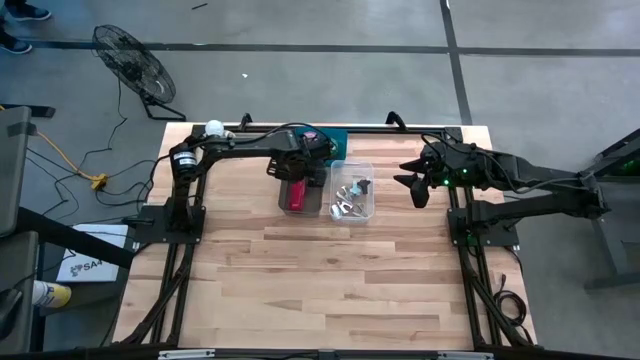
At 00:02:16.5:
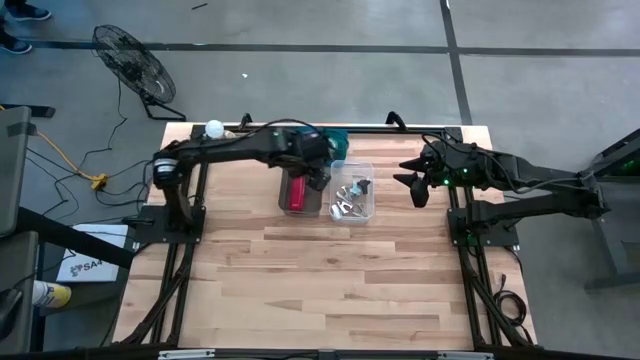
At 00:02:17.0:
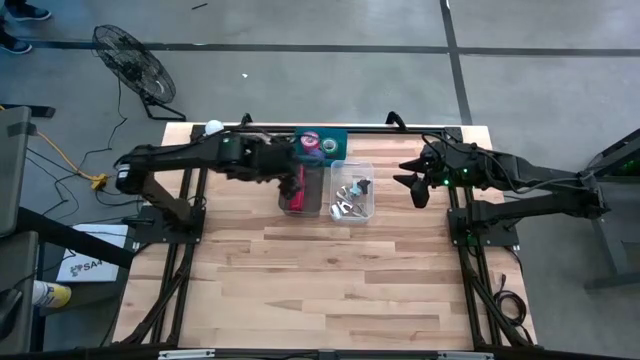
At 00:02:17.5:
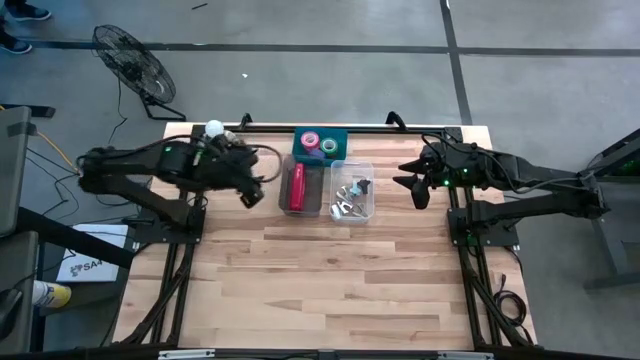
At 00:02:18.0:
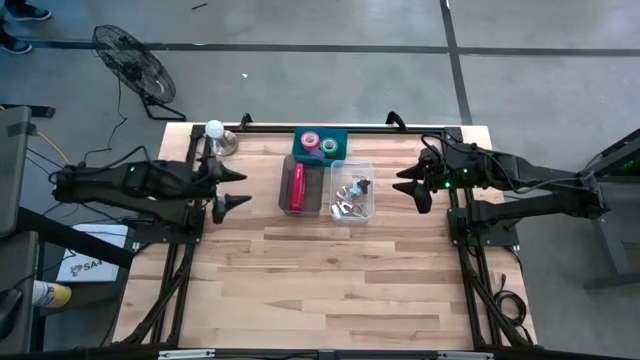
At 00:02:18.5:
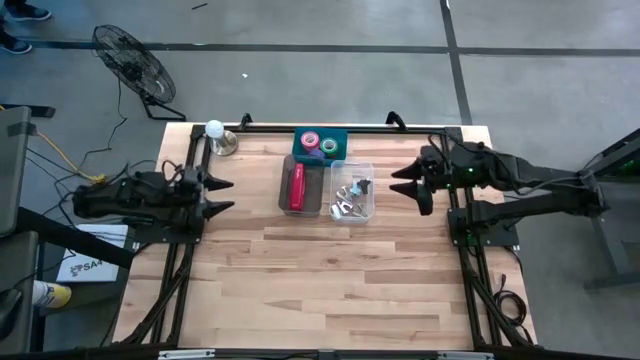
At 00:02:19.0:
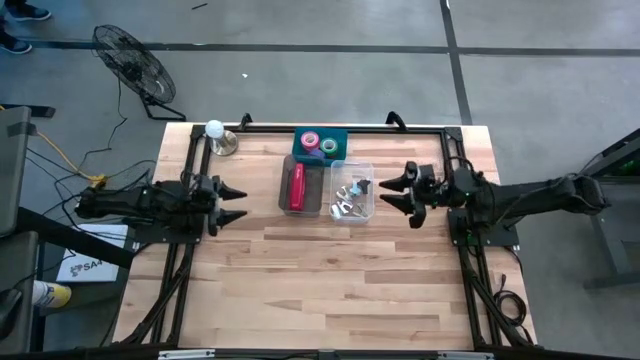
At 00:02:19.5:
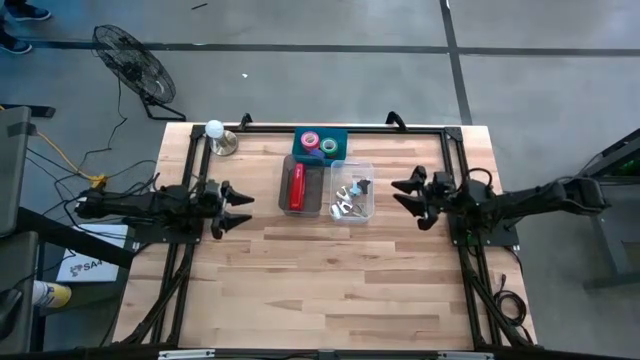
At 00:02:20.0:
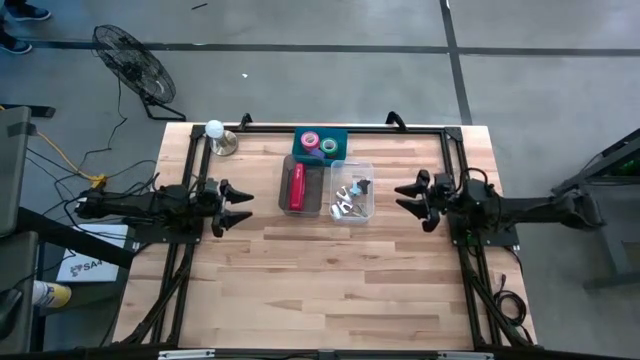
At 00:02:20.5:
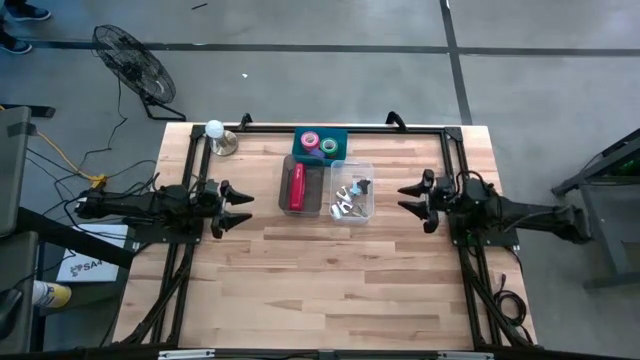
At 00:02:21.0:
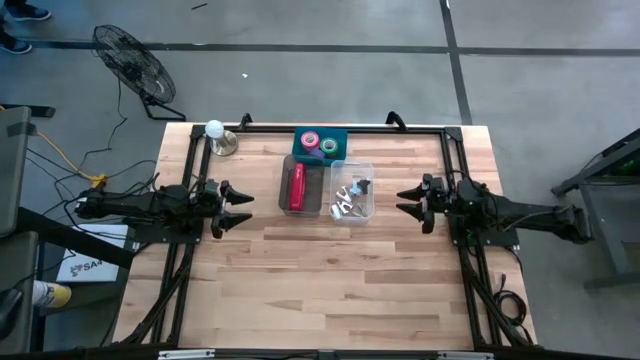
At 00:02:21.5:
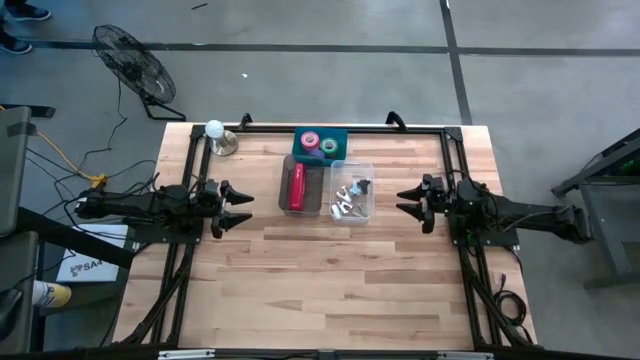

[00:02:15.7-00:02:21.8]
Task: Pick and place Stapler, Stapler remover, tape
Return to Home Position

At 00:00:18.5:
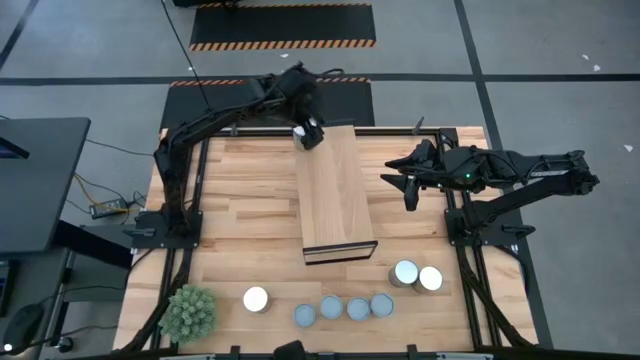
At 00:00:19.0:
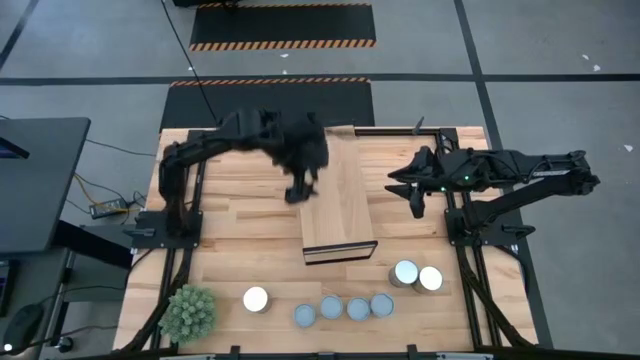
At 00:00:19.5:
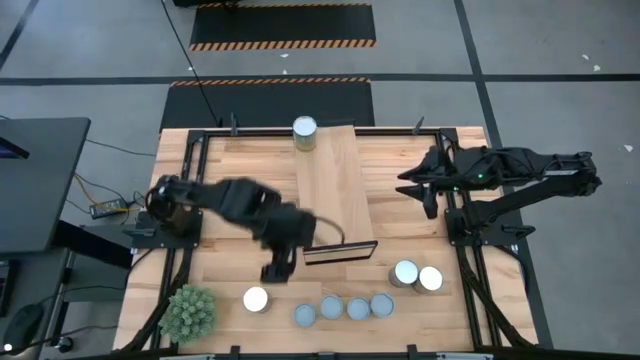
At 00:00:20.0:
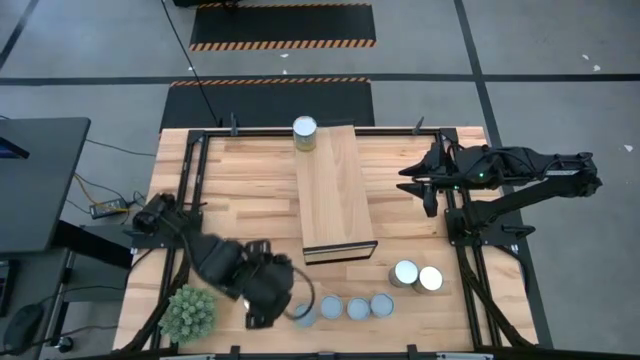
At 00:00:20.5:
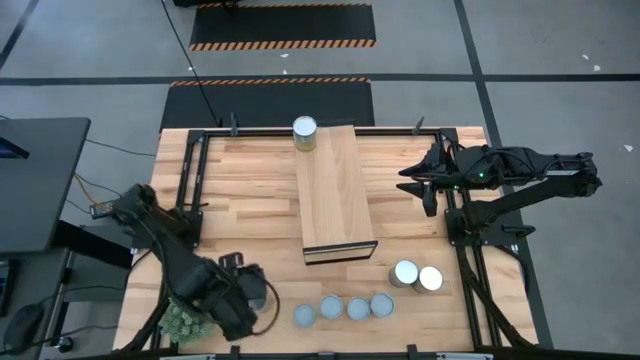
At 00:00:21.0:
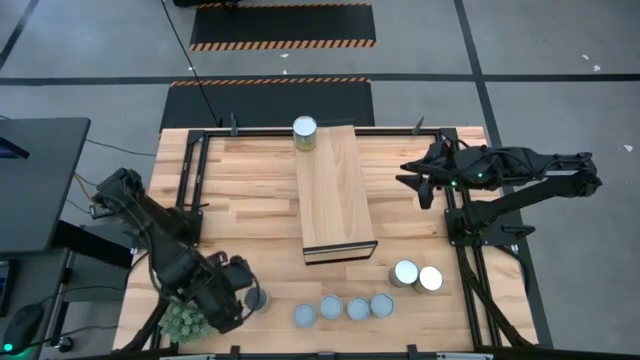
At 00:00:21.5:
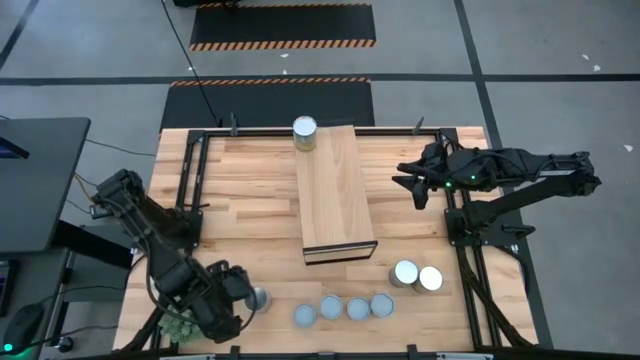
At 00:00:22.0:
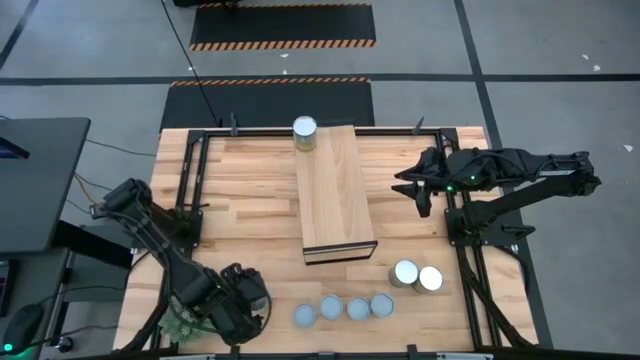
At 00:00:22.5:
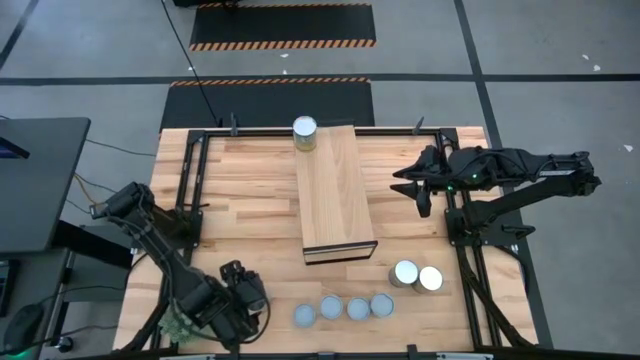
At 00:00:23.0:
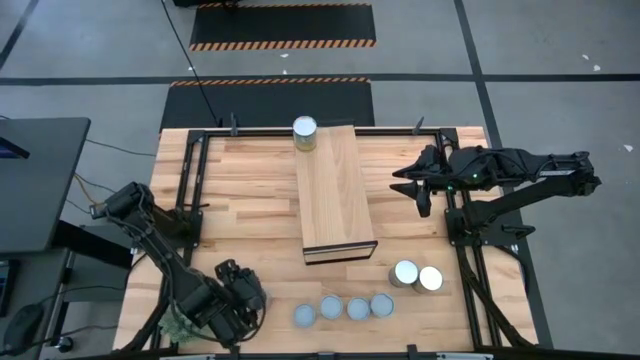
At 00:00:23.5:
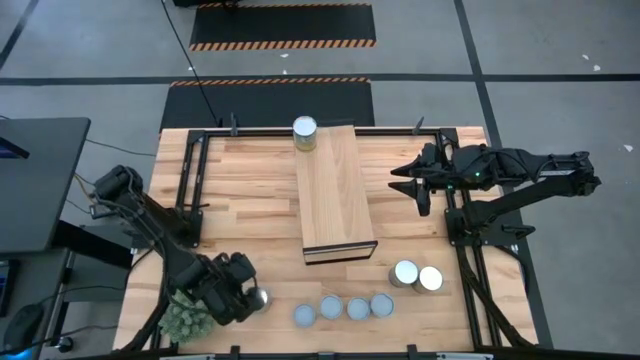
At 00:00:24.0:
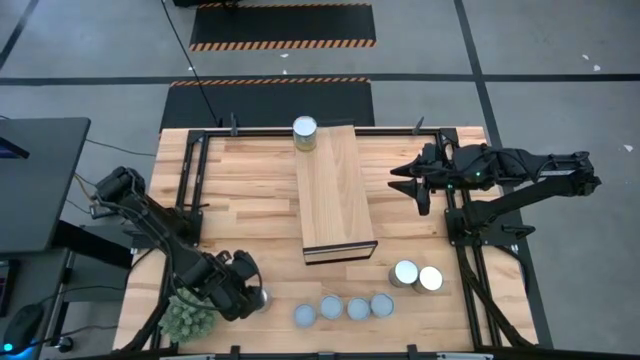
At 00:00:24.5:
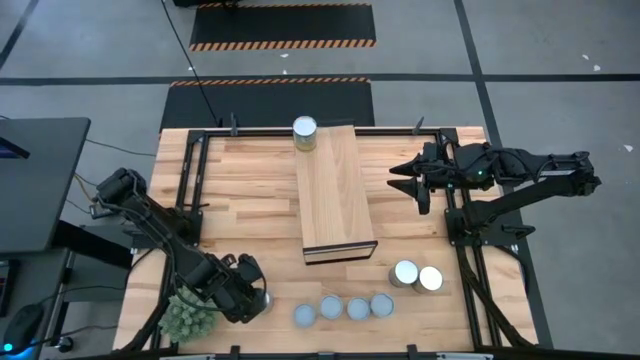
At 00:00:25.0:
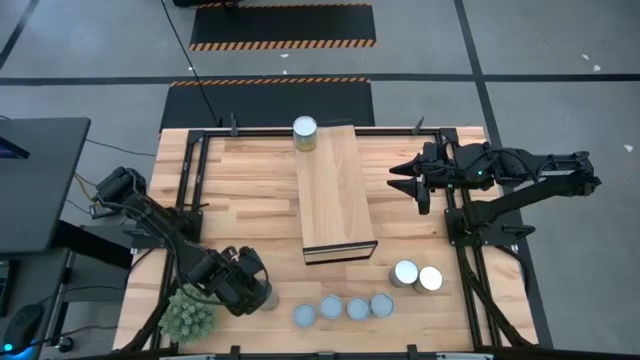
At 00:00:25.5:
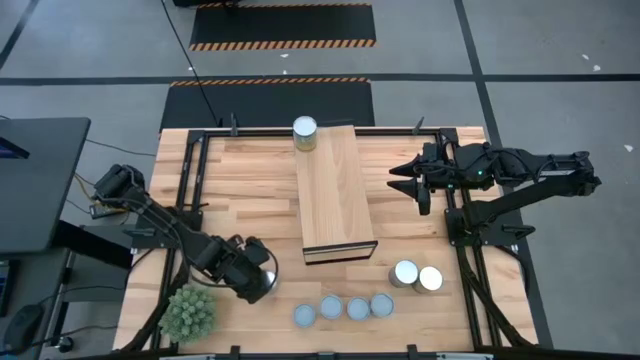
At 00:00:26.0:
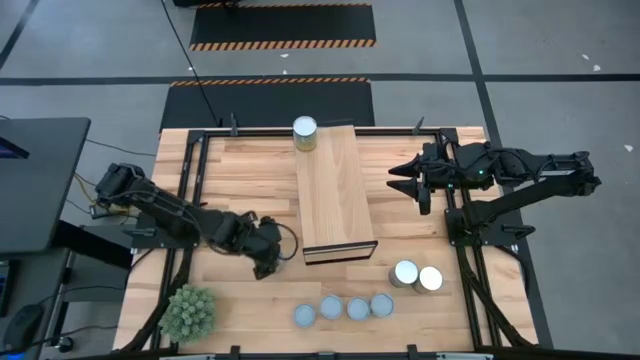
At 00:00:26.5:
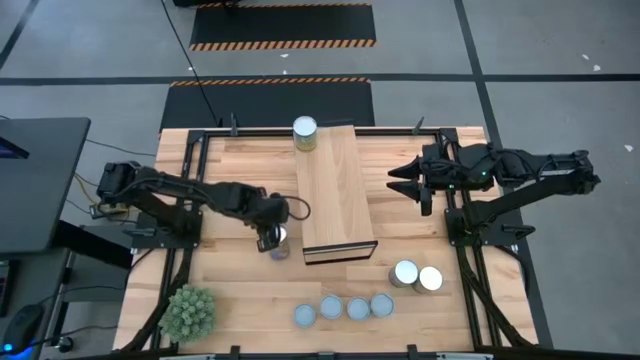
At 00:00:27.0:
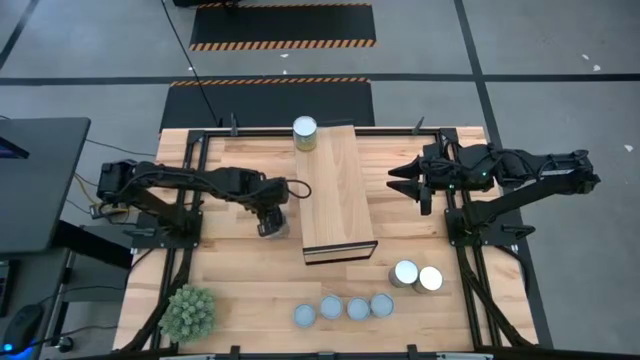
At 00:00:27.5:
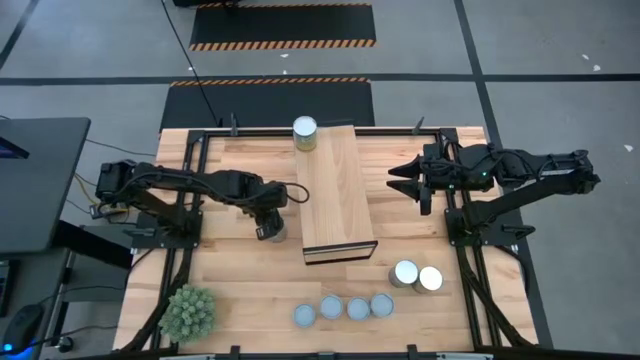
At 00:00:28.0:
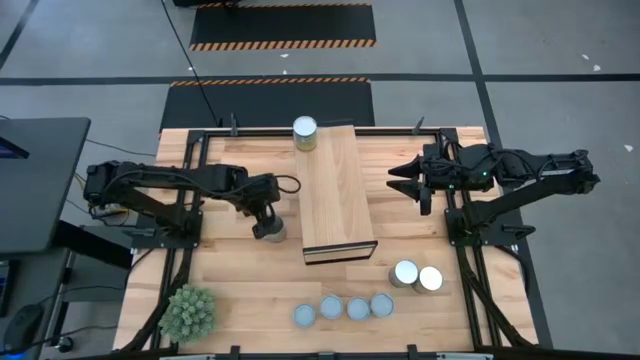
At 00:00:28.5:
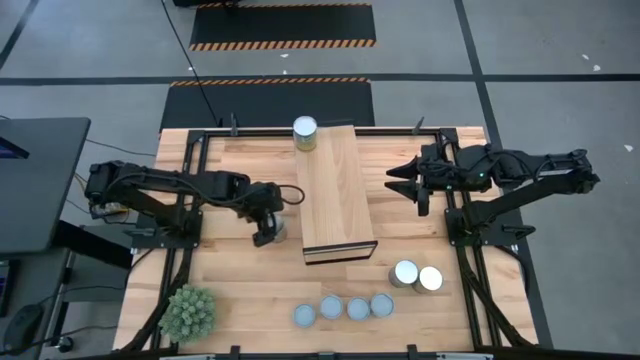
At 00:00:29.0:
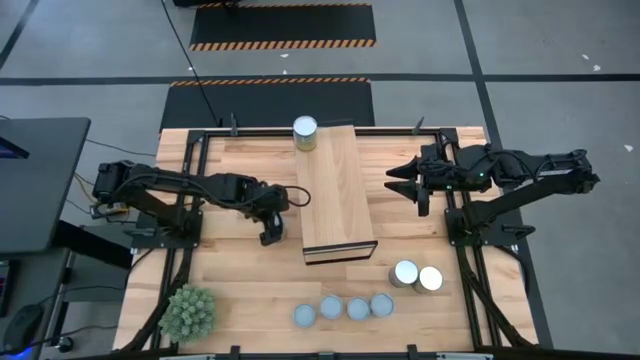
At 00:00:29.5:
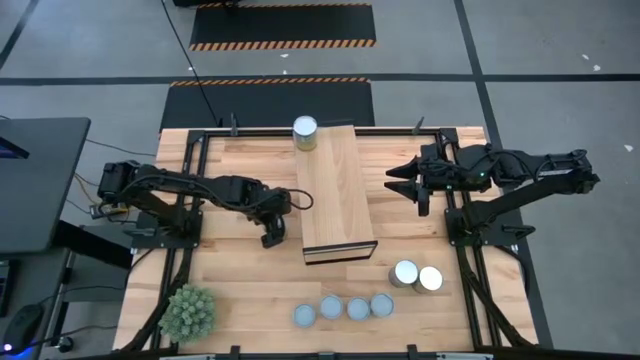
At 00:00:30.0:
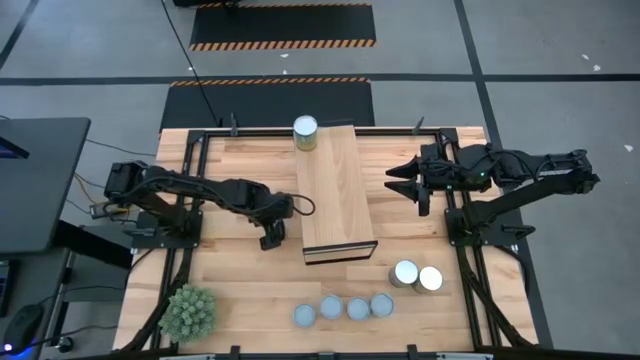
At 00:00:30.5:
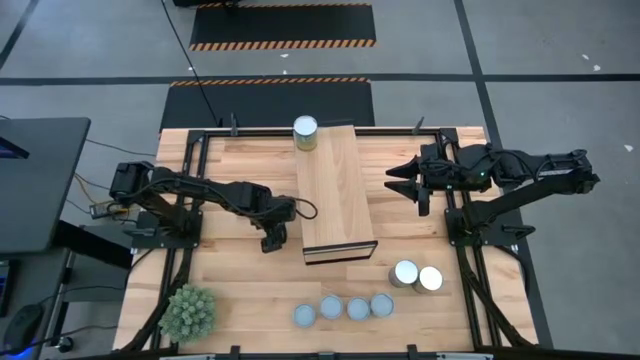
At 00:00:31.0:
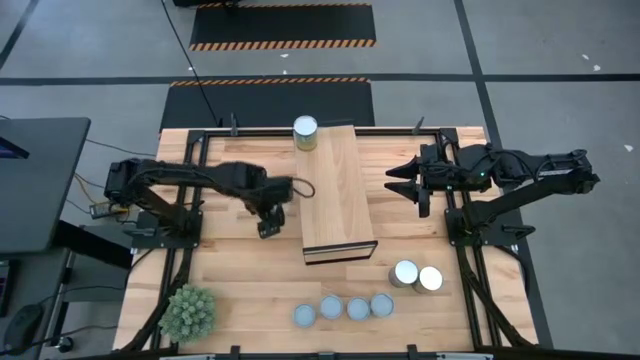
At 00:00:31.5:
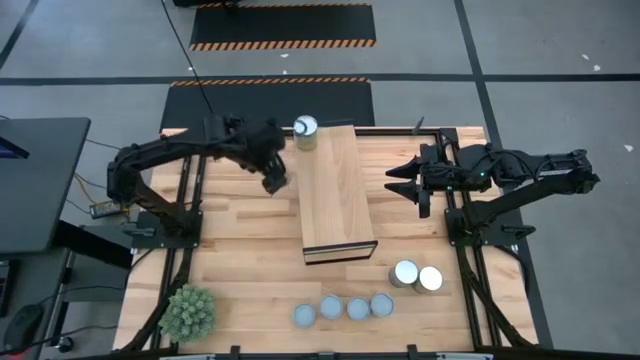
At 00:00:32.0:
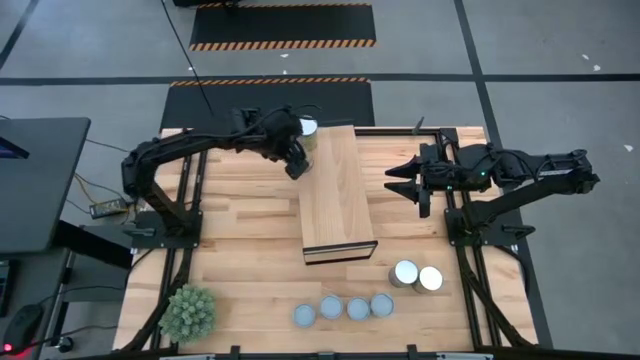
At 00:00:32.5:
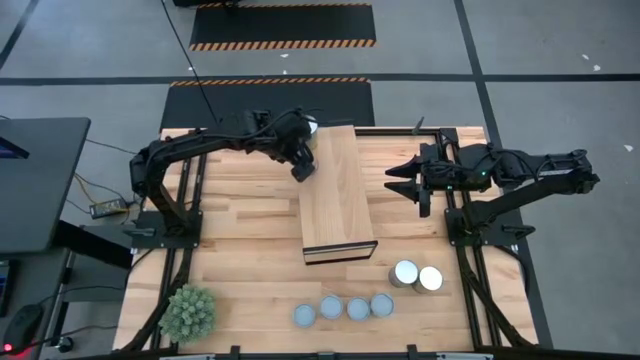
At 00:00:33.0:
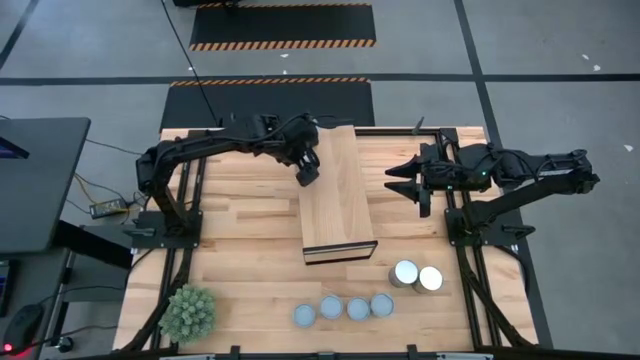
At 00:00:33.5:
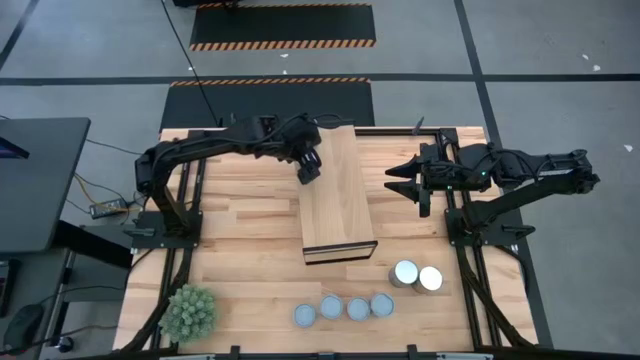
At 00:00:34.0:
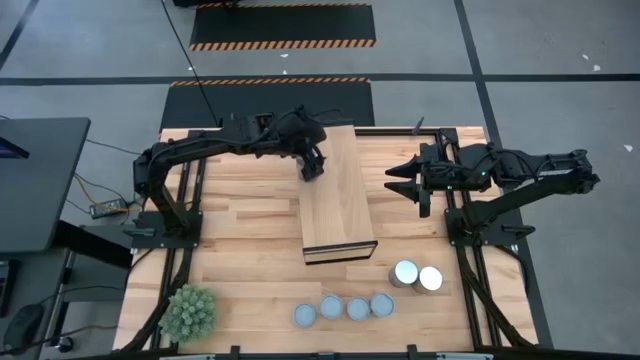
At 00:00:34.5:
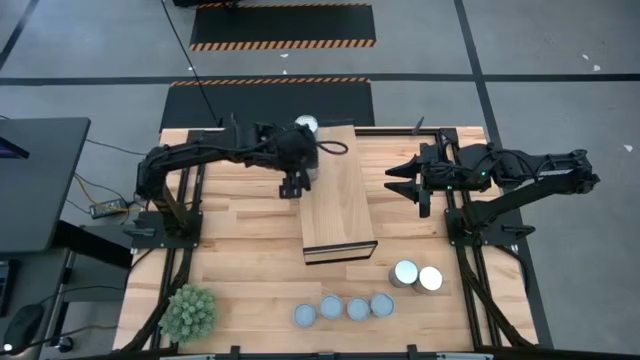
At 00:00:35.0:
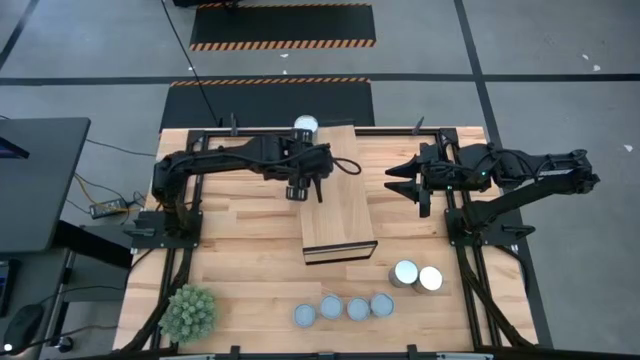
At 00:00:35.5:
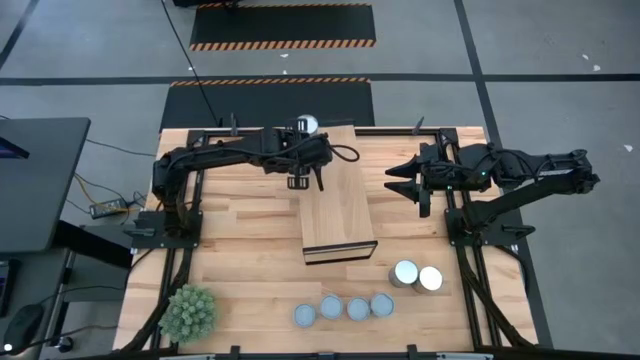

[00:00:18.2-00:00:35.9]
Task: Pick and place cans onto a shelf
Put the canned peaches on the shelf
